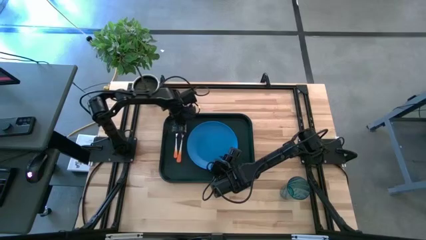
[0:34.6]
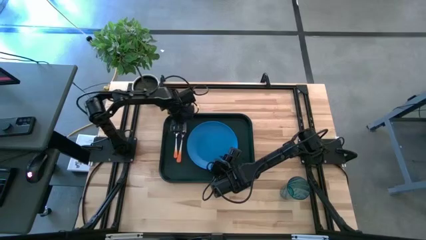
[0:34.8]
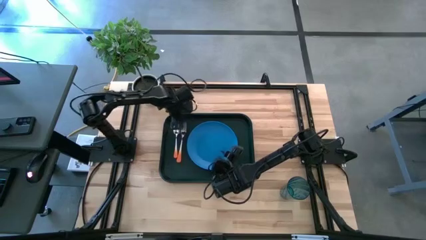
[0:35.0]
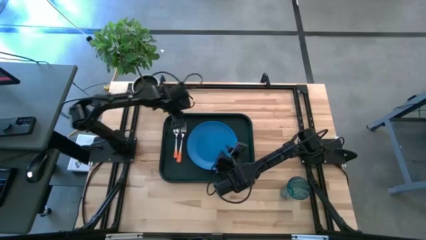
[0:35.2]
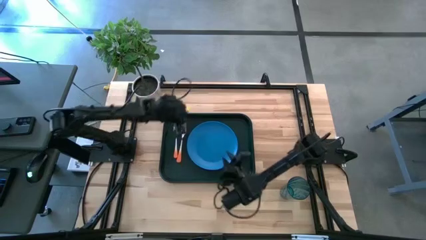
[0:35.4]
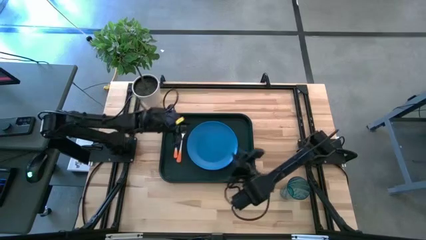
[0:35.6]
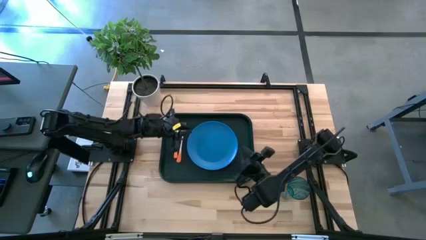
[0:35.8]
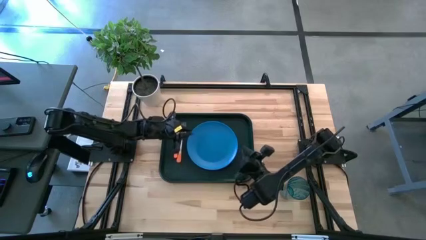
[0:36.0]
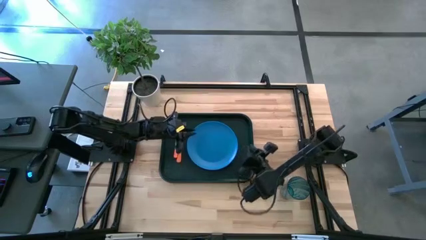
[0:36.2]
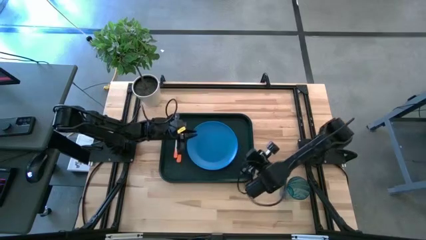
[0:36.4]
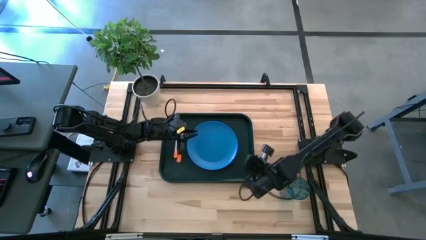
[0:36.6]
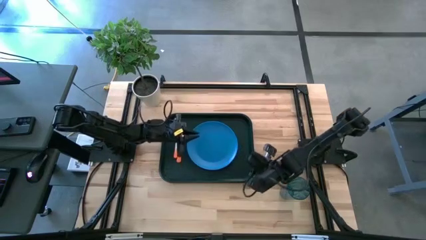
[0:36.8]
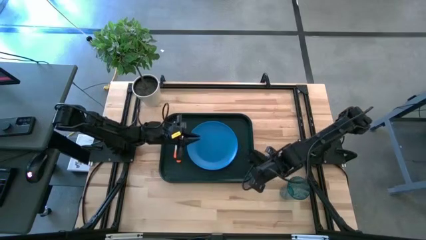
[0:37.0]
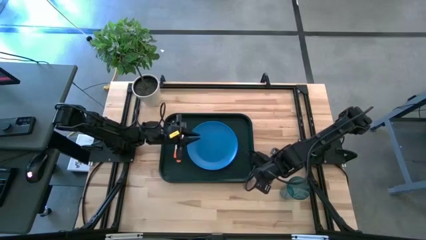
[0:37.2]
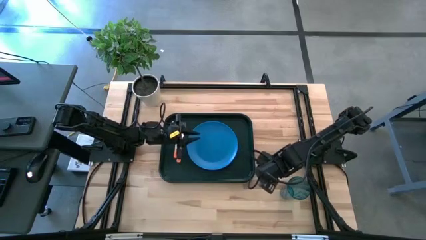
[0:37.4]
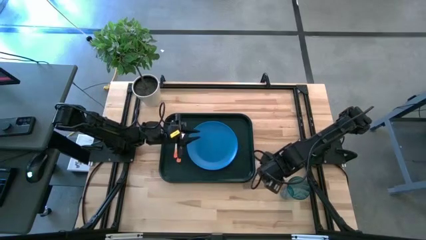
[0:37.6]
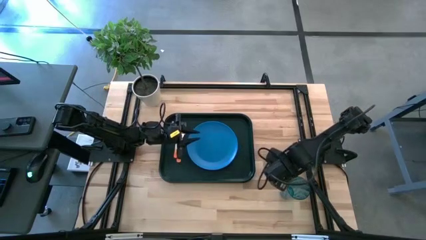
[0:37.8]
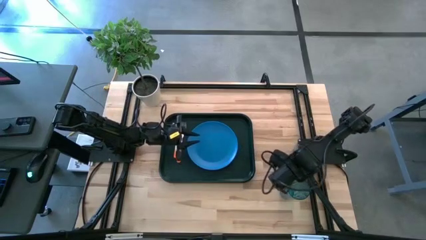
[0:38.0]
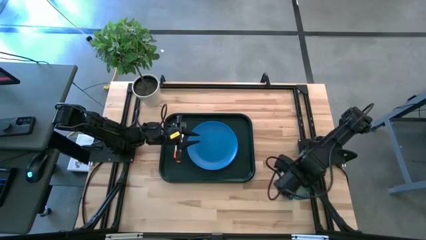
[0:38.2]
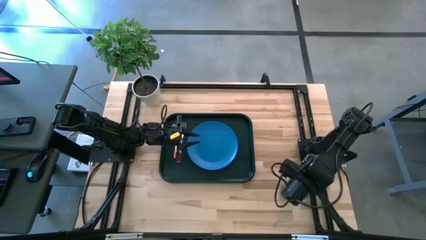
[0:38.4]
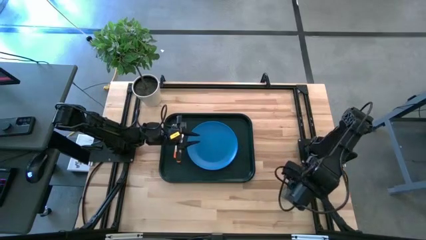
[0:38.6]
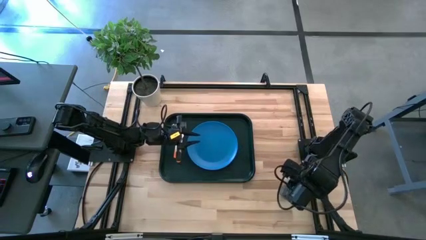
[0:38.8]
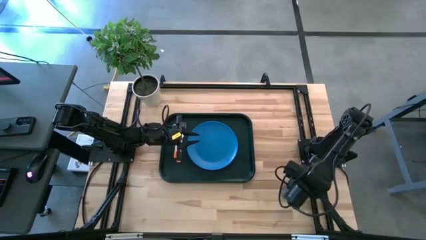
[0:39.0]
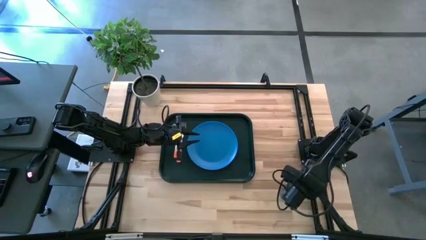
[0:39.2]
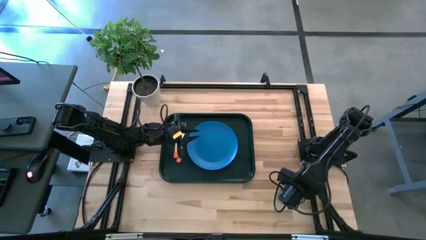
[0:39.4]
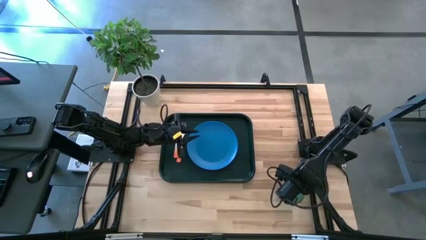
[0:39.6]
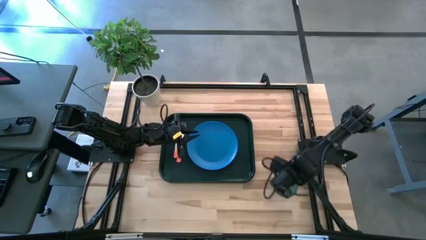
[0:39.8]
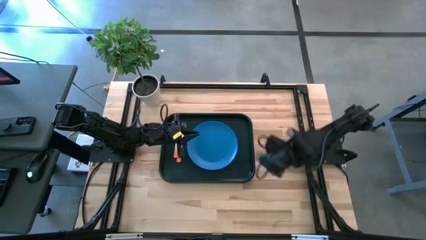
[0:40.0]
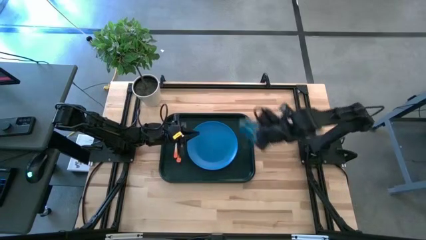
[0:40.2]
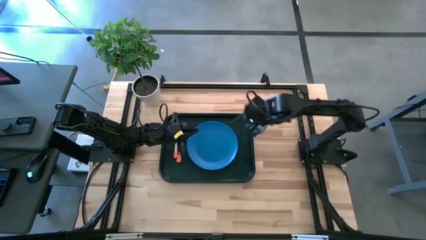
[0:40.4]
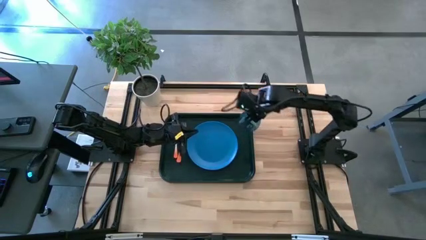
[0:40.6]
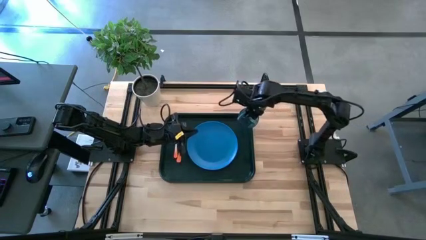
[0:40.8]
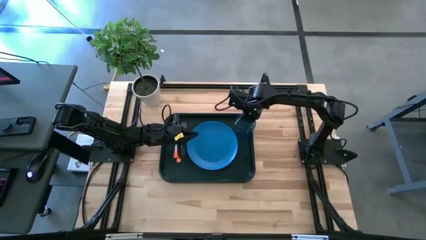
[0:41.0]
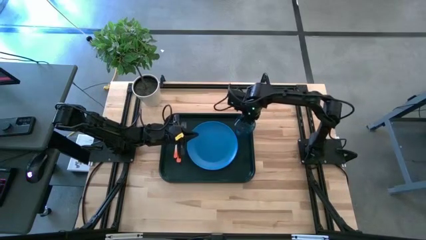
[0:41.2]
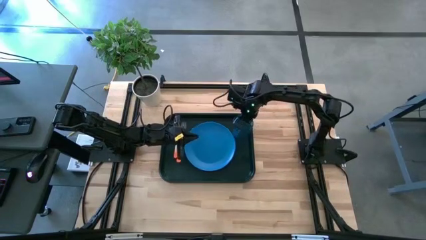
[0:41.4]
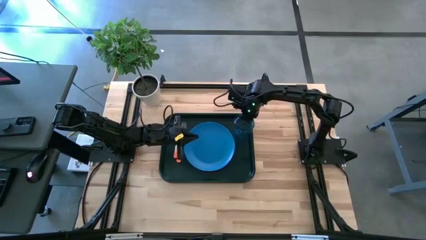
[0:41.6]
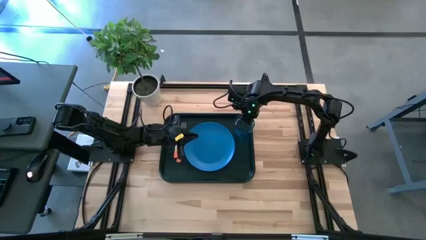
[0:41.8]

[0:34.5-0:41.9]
Task: Pick and place plate/cup/fork/spoon on tray
Put the blue glass on the black tray

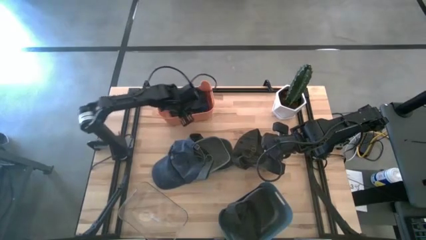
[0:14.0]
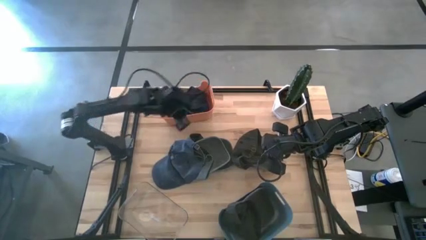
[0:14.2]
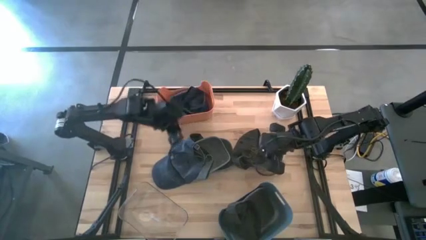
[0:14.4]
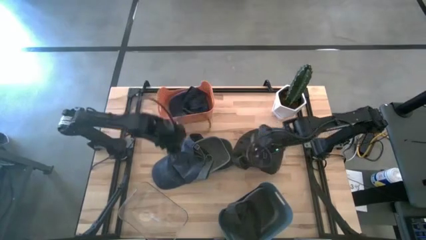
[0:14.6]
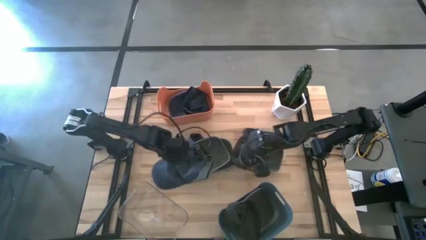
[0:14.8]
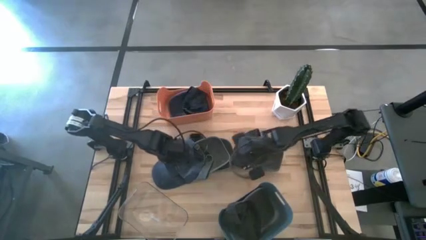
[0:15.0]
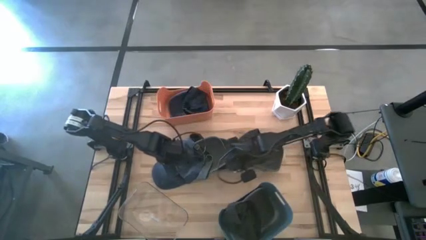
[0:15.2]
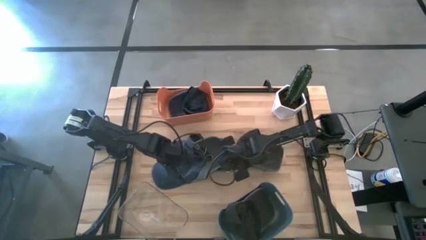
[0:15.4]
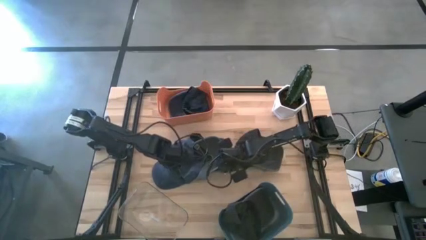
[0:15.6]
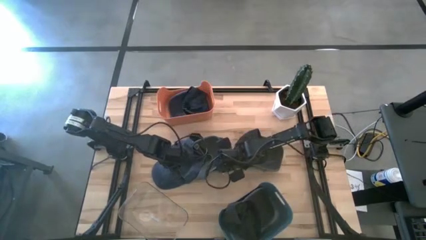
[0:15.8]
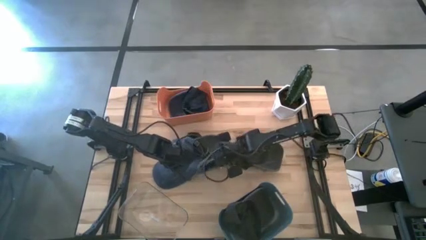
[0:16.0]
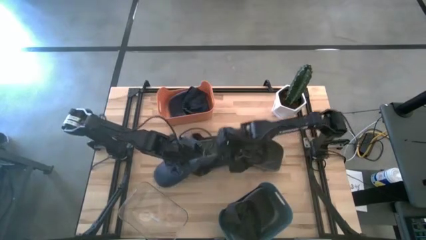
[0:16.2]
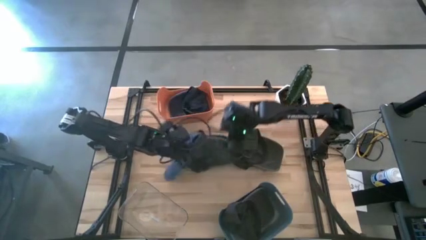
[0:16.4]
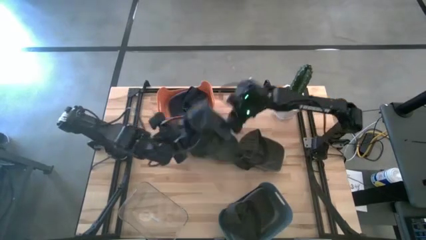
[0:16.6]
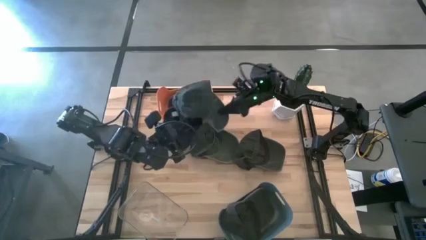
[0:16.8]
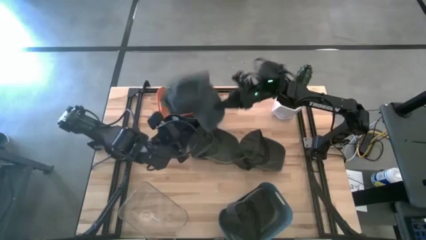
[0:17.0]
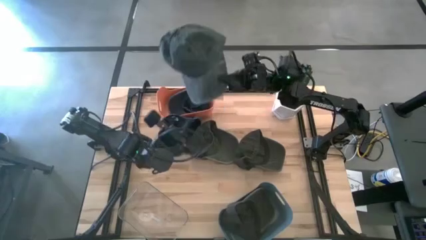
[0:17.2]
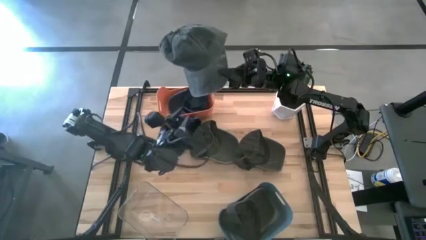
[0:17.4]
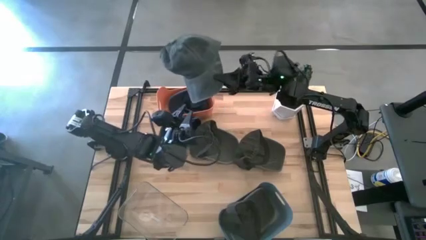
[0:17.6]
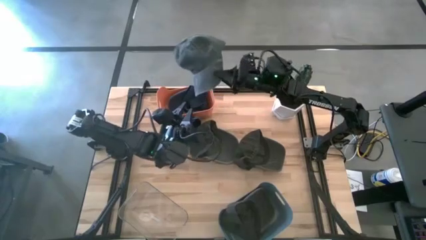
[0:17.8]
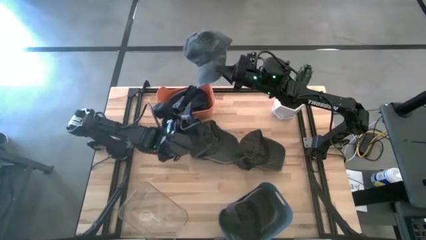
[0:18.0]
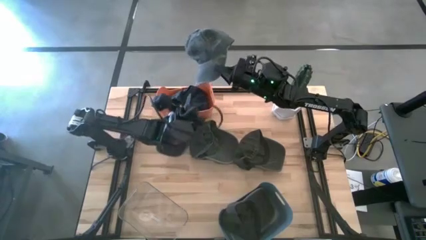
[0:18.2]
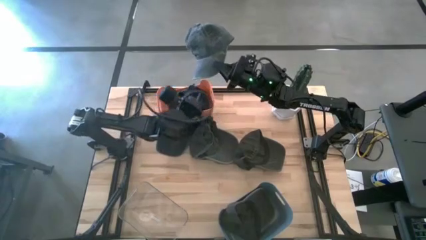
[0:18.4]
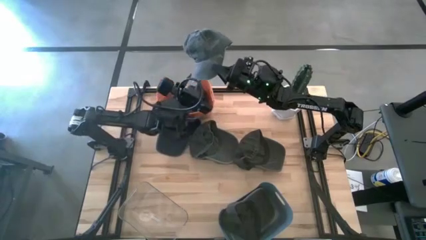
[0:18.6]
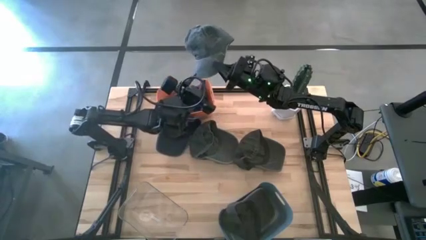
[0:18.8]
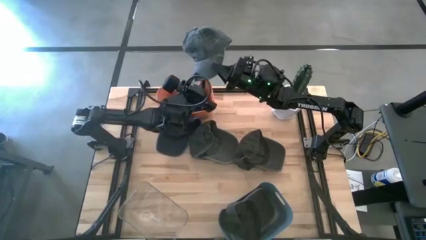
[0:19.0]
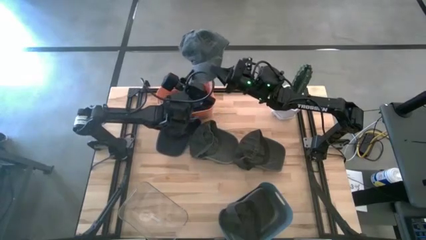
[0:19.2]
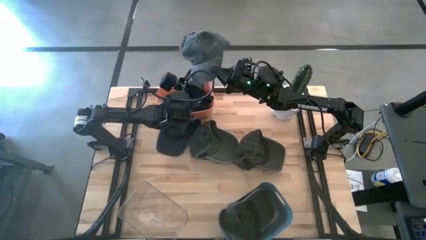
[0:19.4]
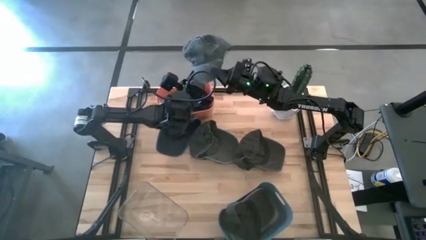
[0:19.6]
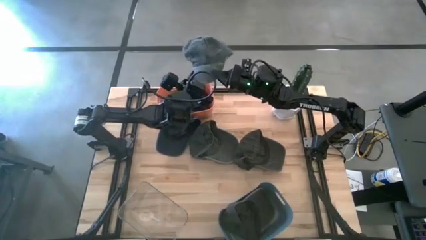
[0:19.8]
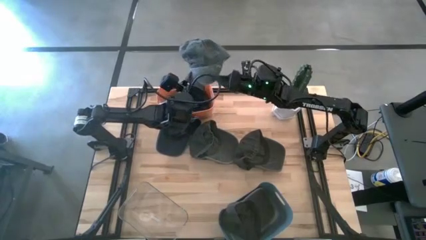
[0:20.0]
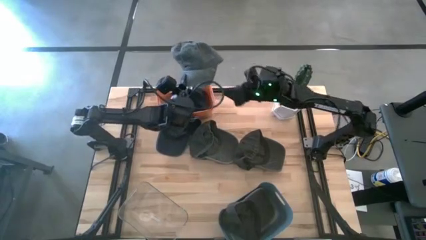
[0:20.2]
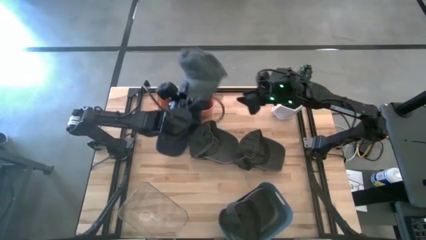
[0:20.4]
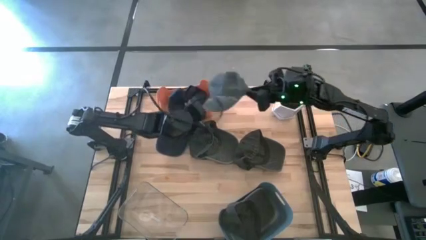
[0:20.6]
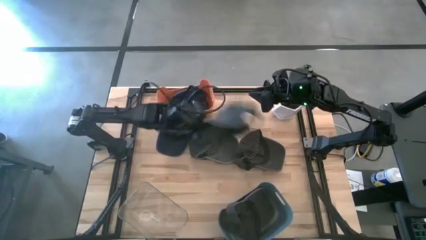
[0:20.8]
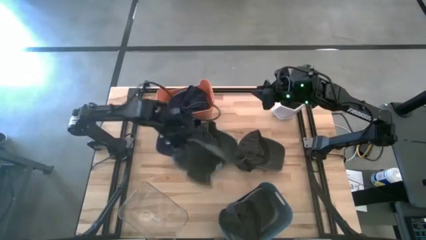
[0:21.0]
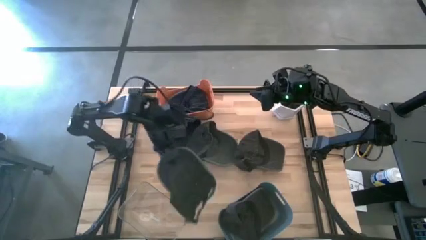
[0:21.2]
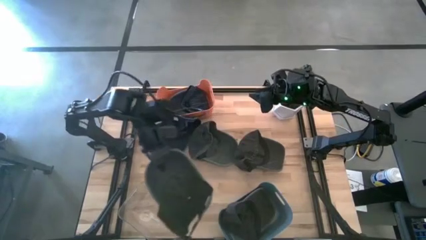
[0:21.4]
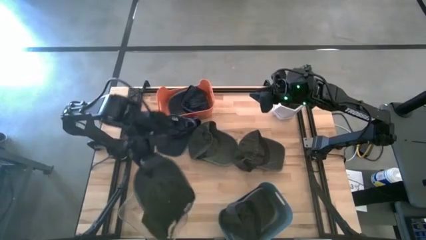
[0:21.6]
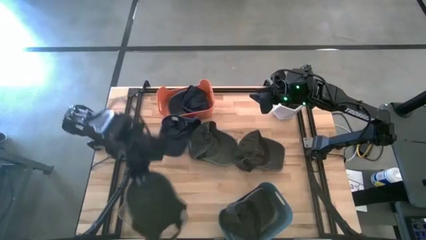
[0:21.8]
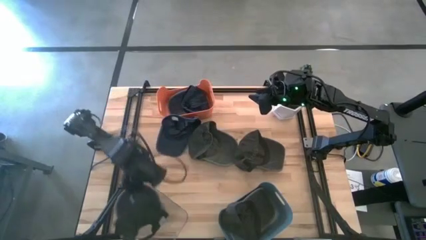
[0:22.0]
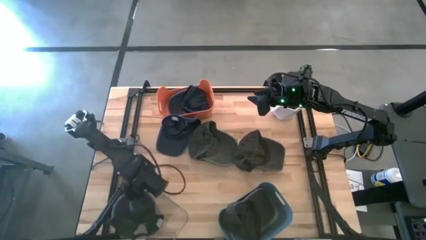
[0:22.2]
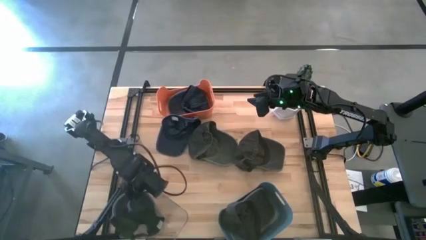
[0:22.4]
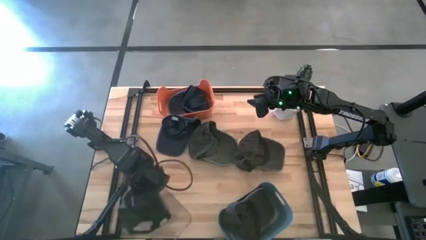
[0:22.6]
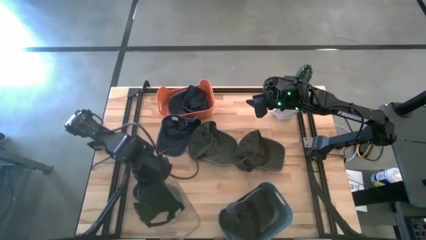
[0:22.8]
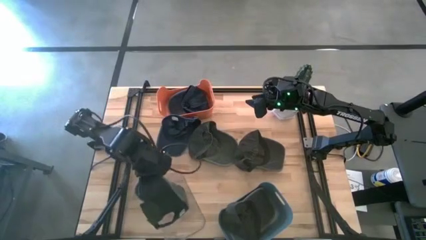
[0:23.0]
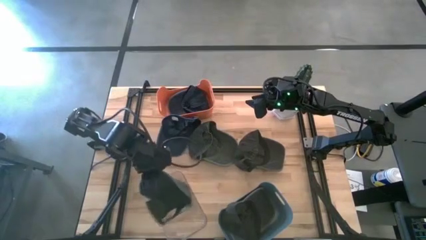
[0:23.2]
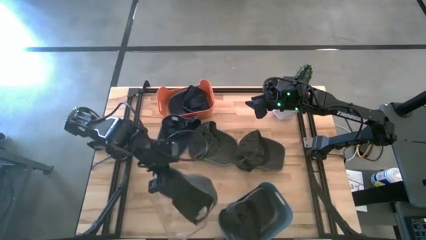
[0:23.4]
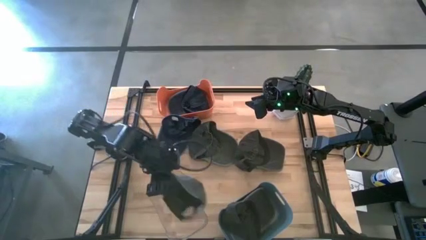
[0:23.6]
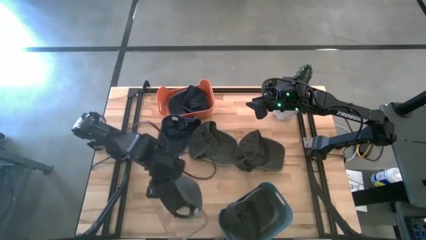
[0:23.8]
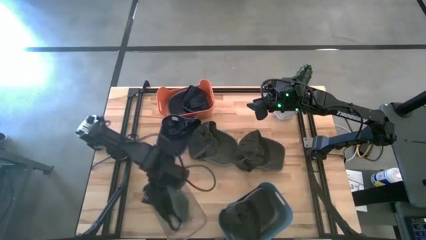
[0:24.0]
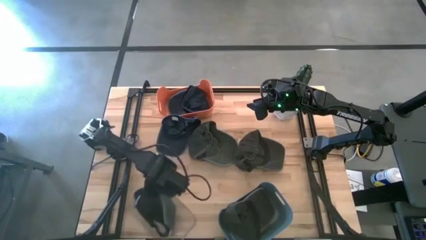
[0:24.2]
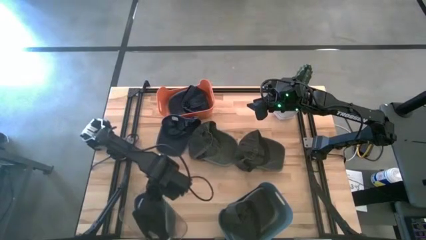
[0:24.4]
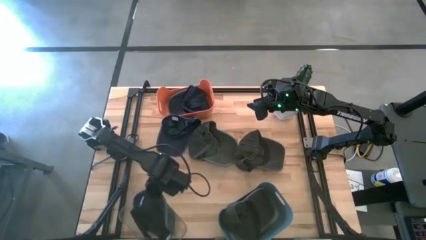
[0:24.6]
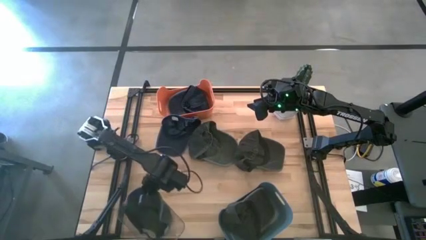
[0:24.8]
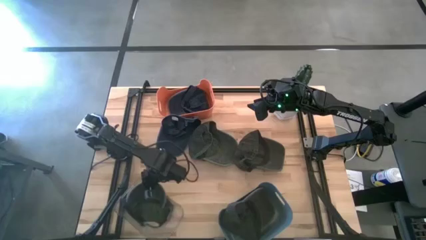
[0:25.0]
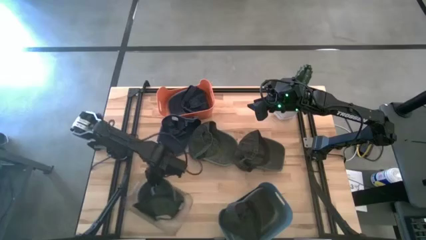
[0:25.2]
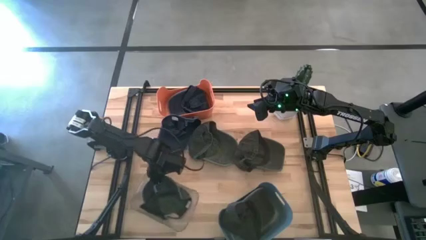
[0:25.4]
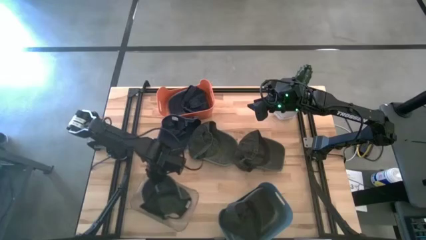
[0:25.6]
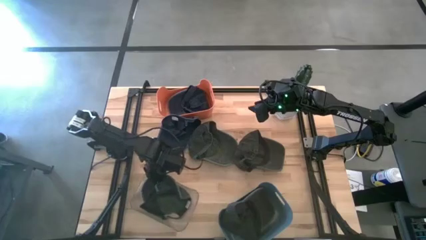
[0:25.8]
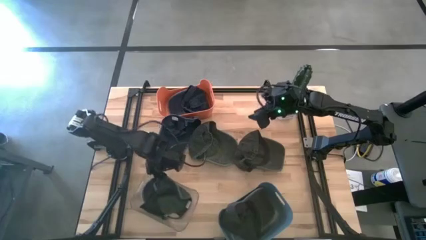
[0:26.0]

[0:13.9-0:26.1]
Task: Pick & Place hat
Put the top gray cap into the transparent bin
